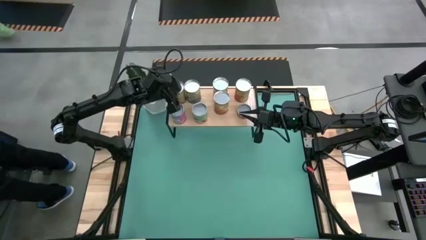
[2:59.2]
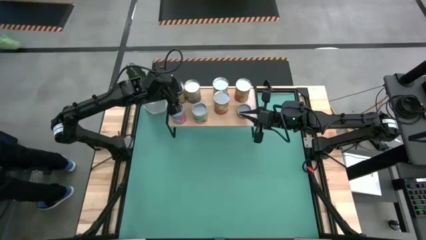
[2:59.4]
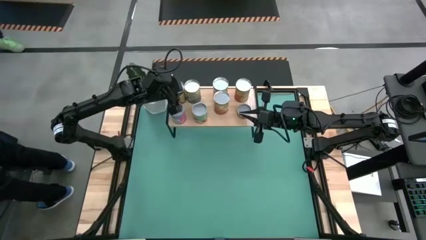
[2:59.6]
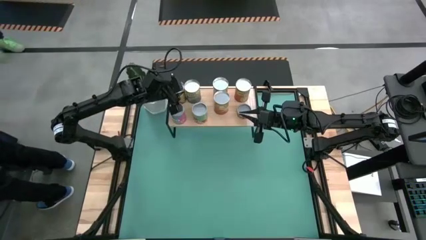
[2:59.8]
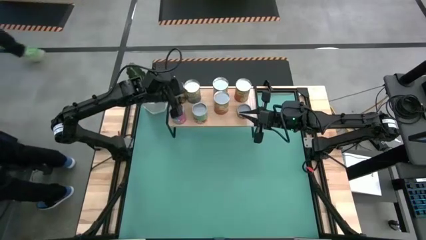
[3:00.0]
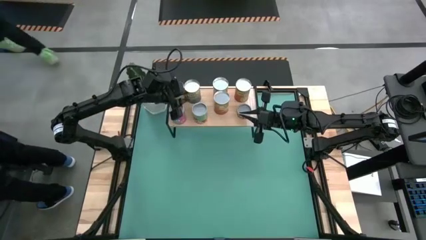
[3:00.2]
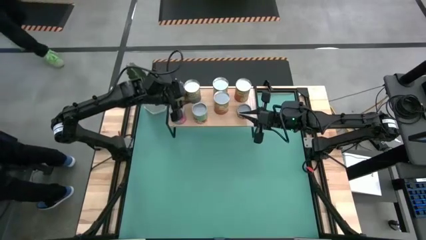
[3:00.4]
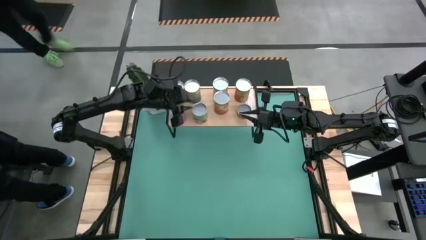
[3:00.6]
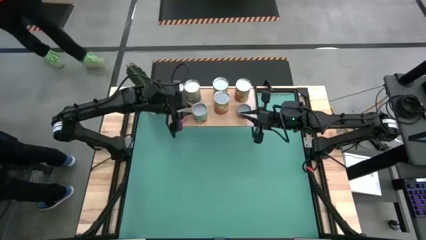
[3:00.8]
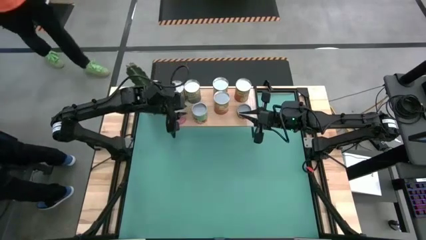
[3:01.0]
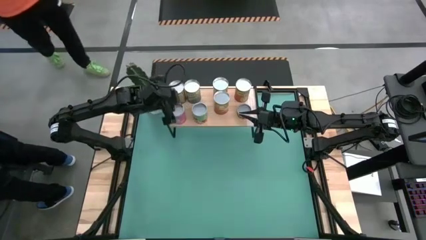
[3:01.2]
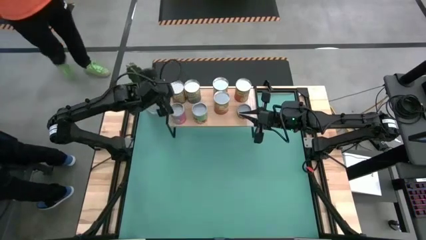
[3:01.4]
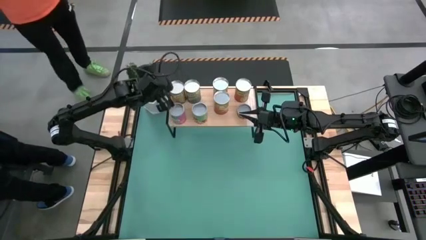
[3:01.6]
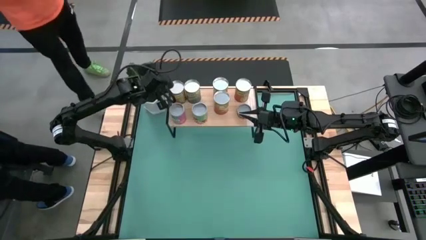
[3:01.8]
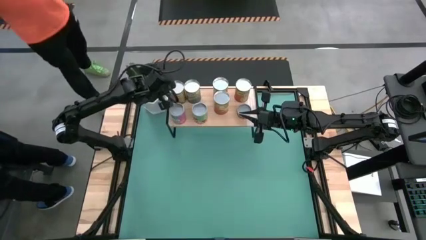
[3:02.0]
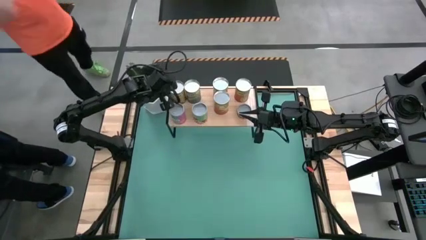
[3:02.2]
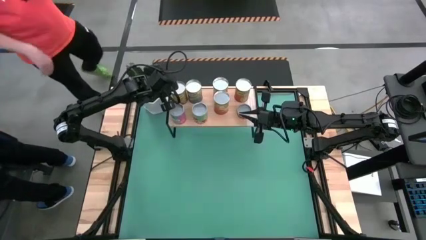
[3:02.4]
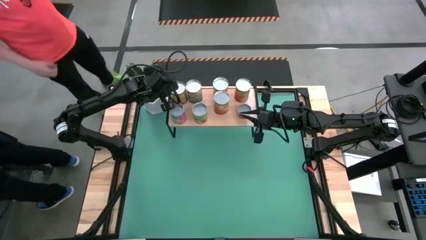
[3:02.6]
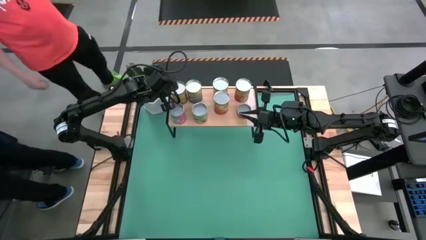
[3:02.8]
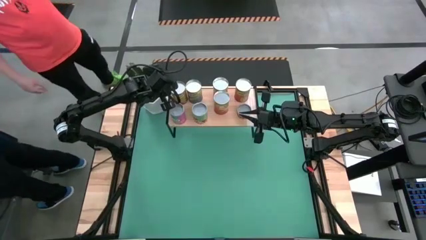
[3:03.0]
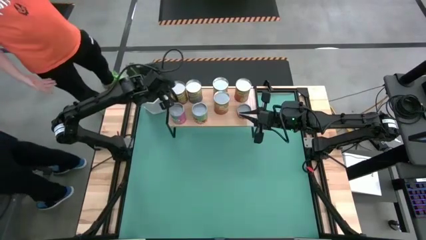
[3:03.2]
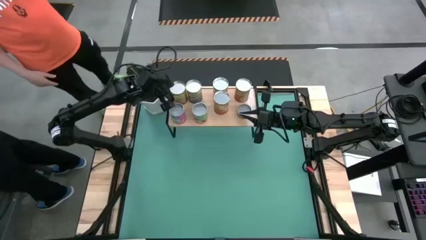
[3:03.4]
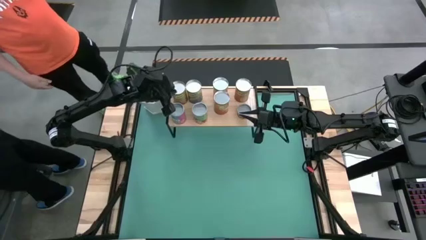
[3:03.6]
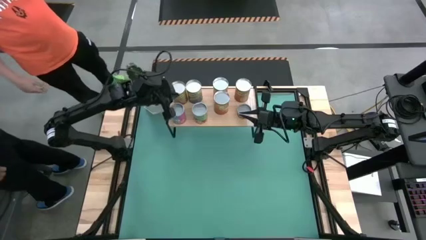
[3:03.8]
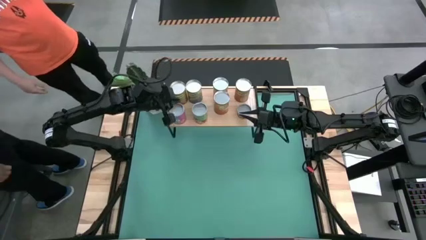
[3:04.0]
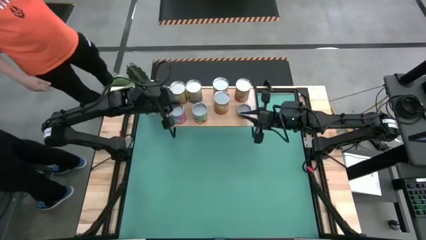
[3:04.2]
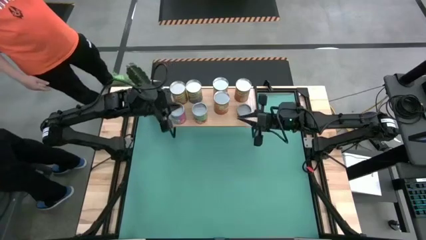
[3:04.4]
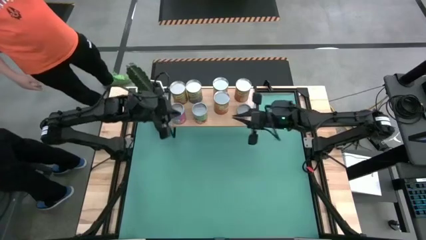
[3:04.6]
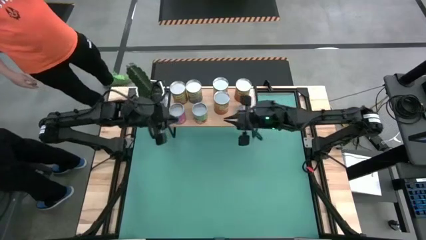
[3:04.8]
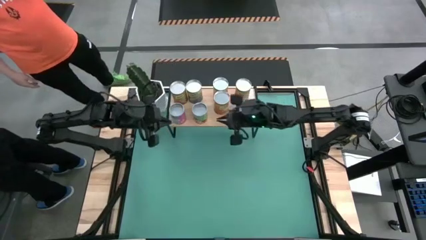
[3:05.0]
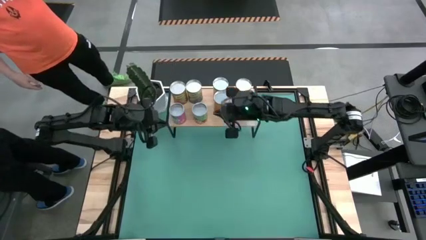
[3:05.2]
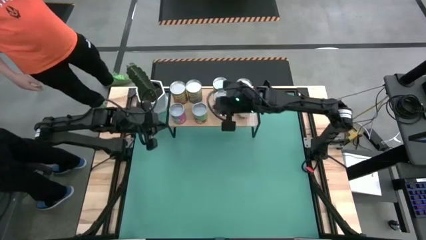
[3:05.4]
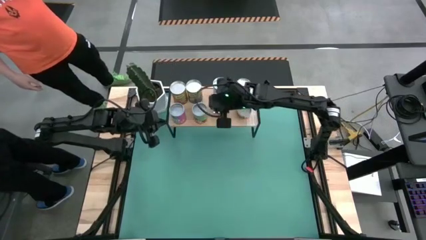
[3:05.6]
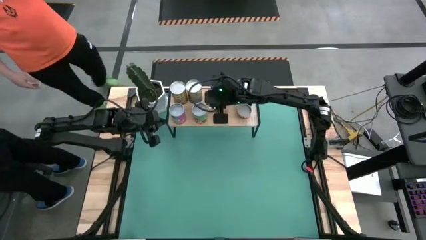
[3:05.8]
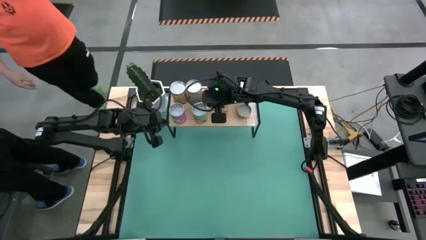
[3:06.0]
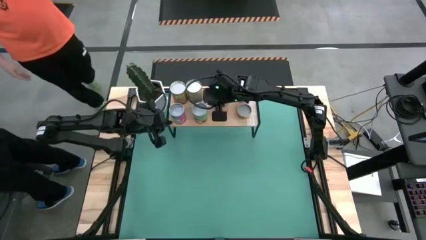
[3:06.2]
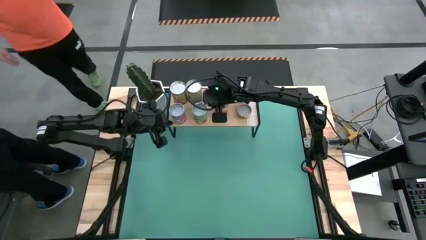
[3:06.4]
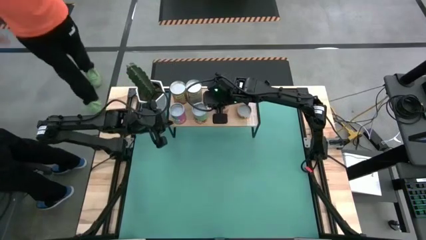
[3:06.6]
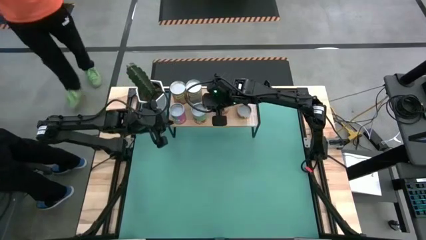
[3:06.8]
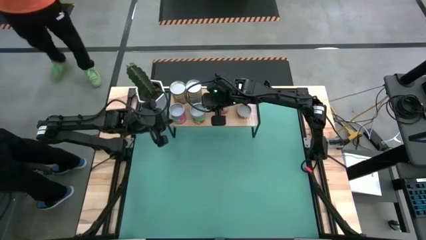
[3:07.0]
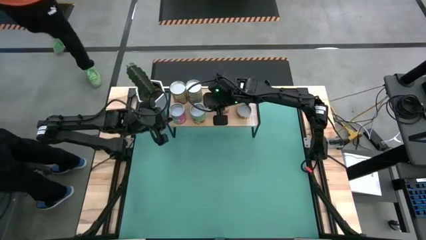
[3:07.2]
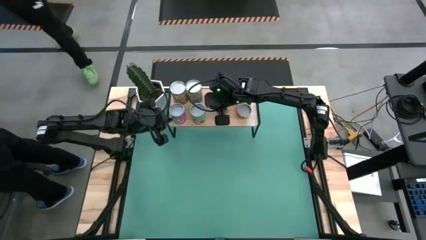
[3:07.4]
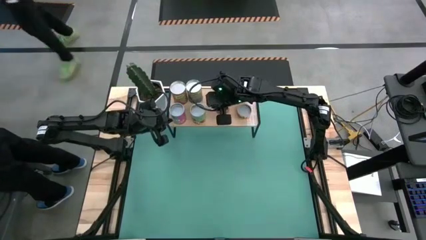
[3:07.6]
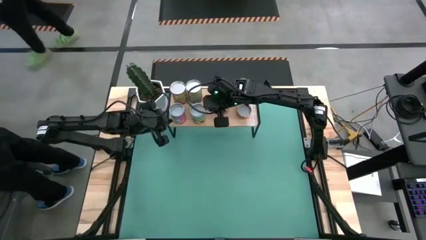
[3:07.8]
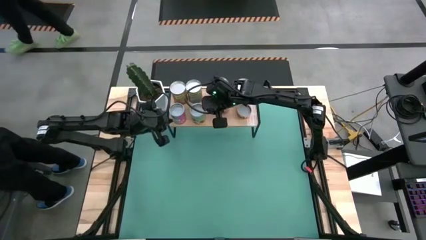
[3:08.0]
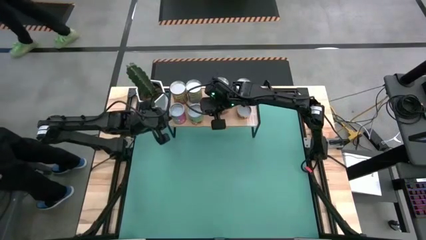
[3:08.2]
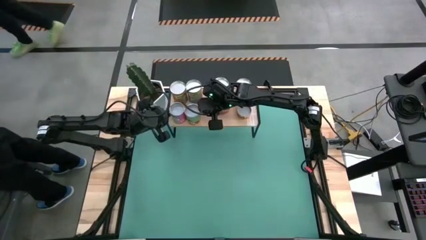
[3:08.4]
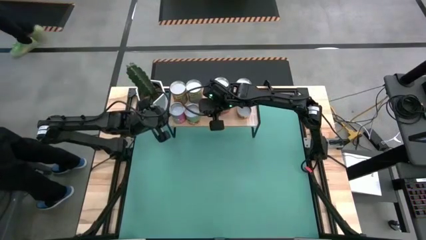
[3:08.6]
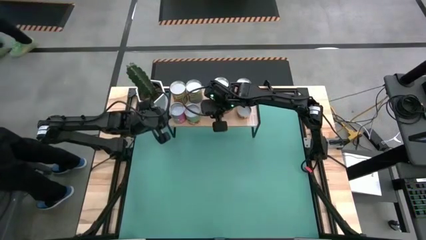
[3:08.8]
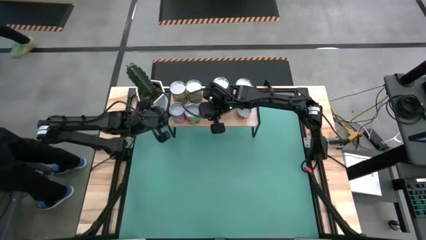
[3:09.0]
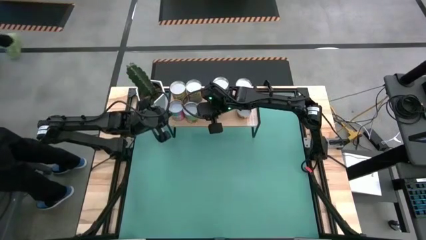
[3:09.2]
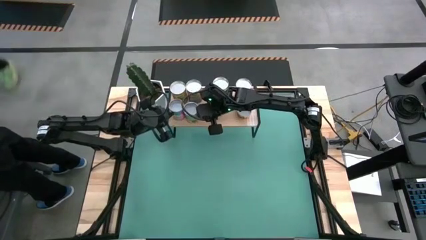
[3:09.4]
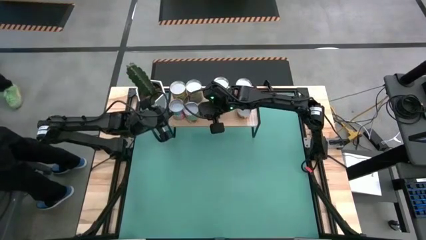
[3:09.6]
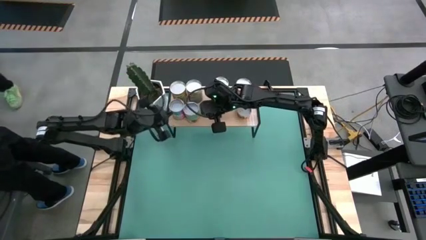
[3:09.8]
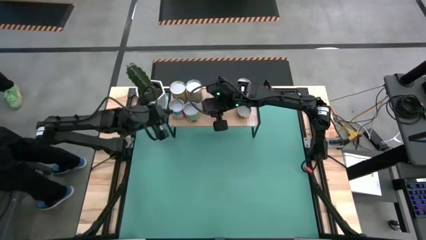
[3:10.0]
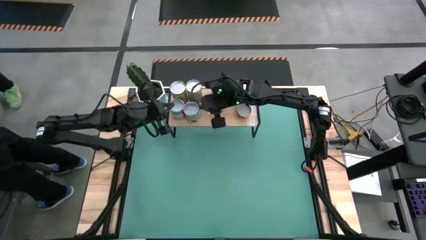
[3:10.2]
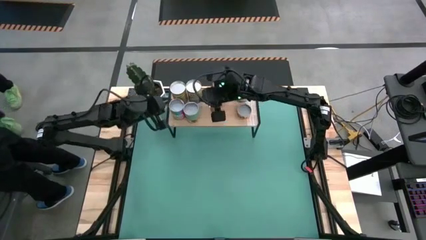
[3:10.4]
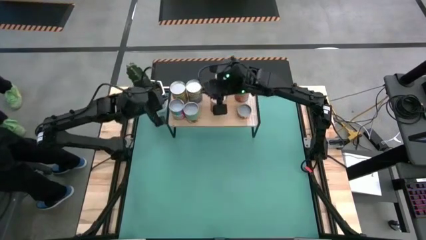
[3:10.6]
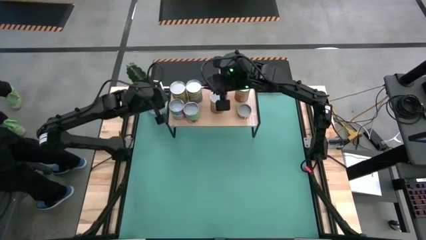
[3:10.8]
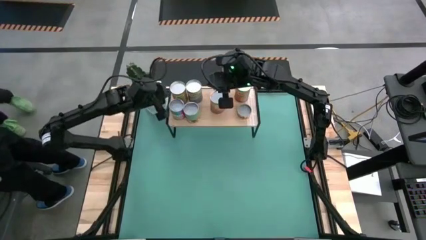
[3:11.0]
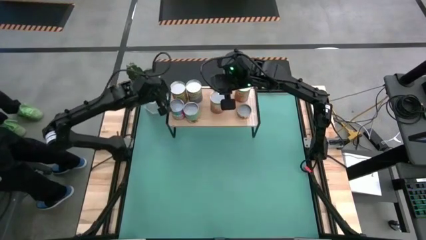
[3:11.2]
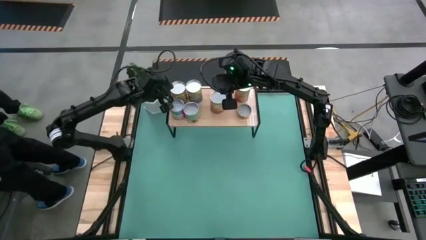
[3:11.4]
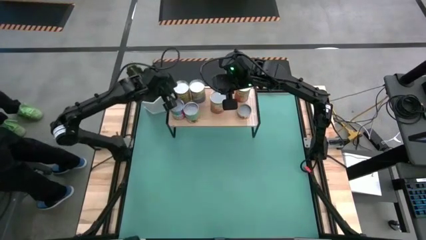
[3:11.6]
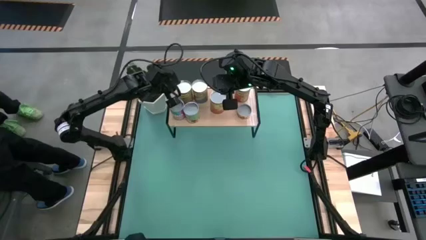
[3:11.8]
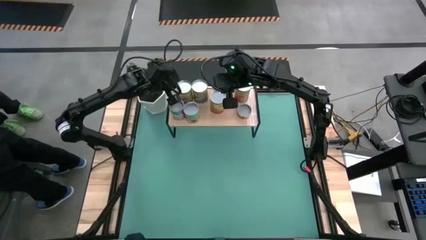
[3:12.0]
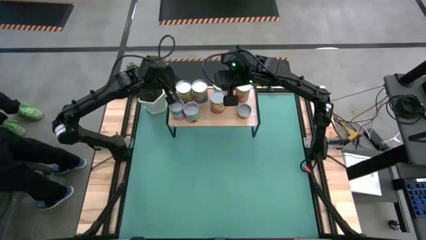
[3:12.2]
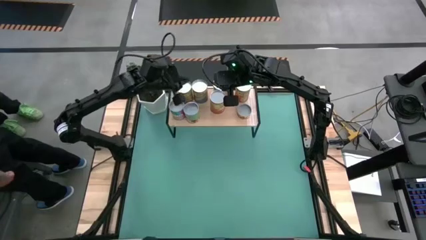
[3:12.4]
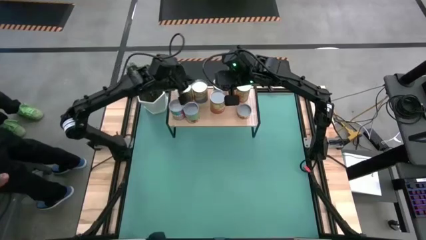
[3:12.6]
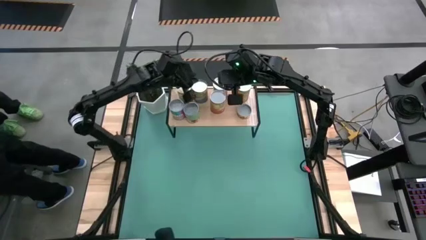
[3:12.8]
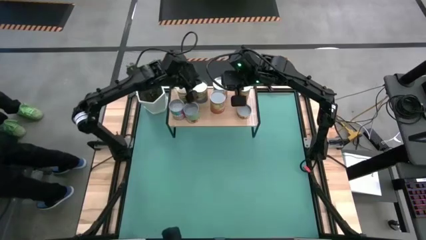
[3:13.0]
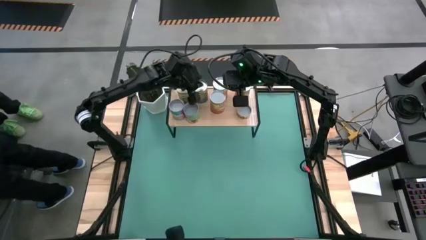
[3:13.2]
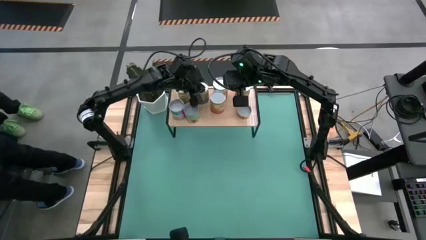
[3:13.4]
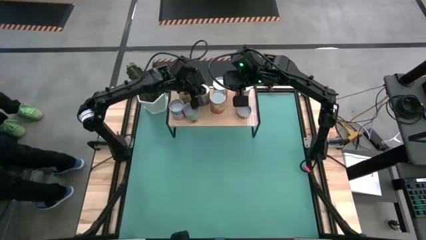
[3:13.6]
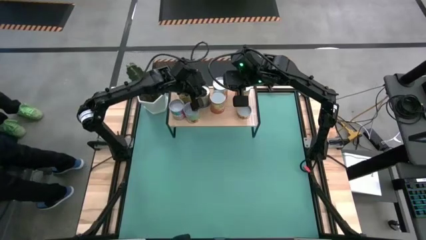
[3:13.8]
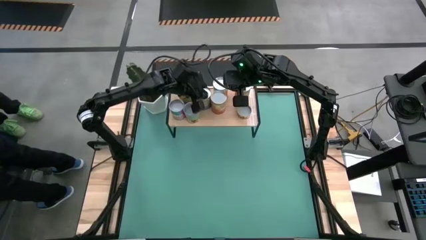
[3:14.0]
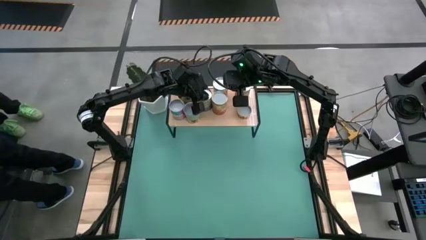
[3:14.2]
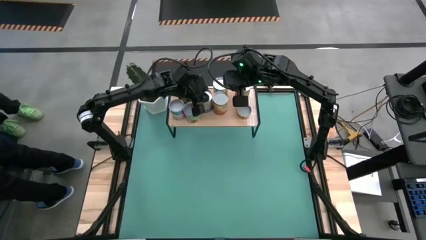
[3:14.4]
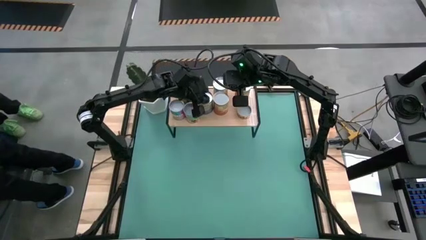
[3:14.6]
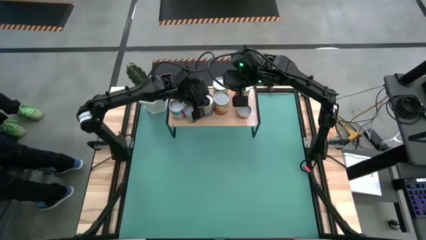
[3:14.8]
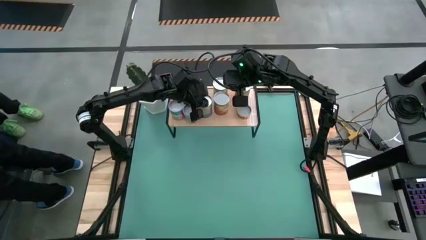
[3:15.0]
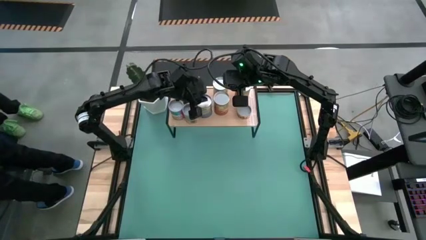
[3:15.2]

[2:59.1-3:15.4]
Task: Pick and place cans onto a shelf
Adjust the canned goods on the shelf
